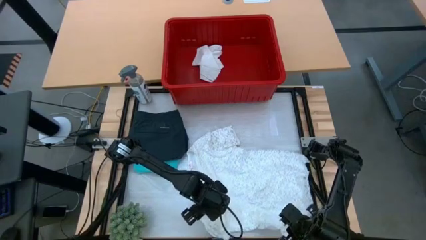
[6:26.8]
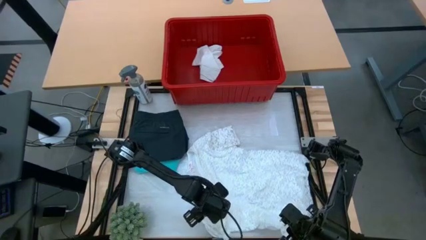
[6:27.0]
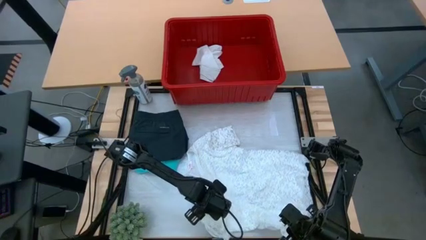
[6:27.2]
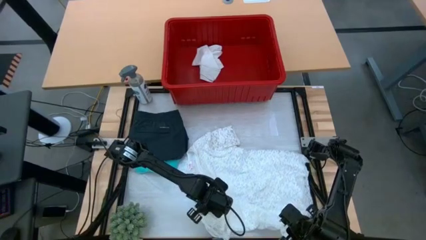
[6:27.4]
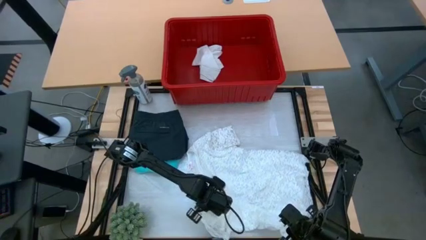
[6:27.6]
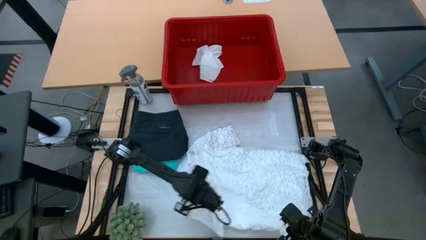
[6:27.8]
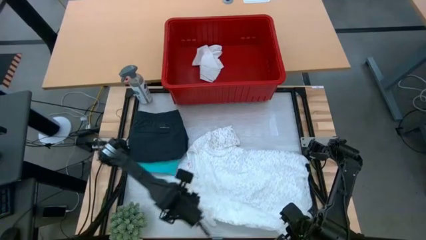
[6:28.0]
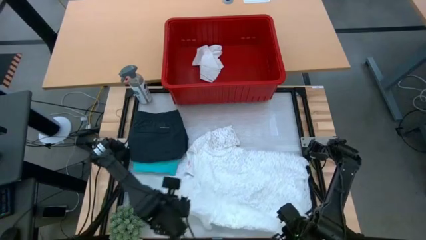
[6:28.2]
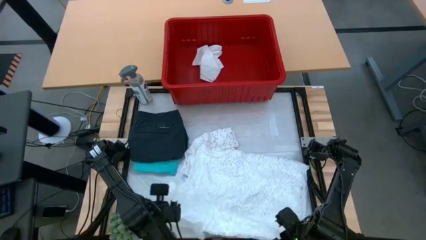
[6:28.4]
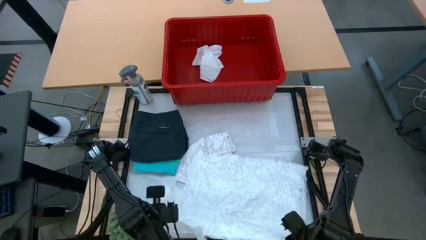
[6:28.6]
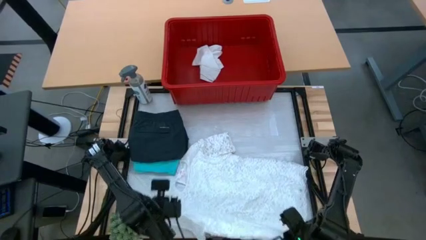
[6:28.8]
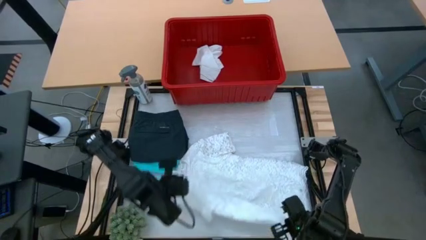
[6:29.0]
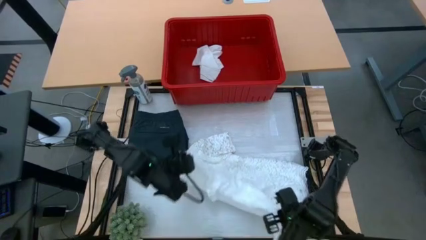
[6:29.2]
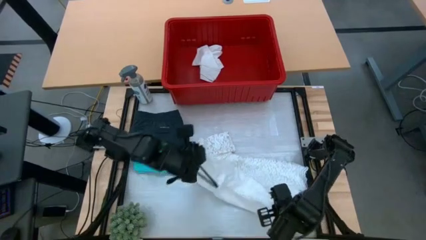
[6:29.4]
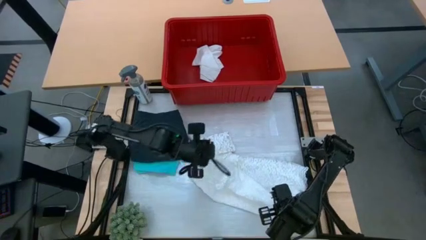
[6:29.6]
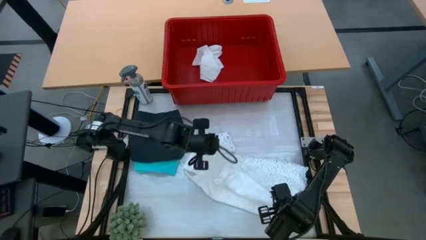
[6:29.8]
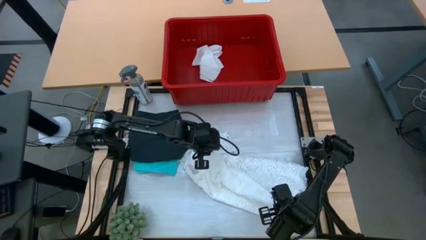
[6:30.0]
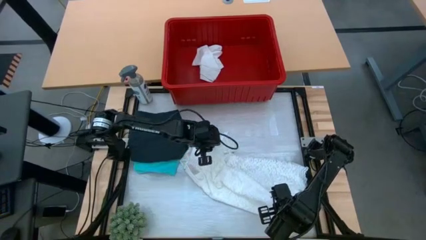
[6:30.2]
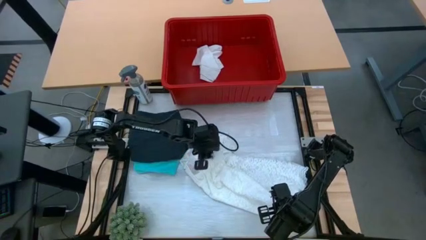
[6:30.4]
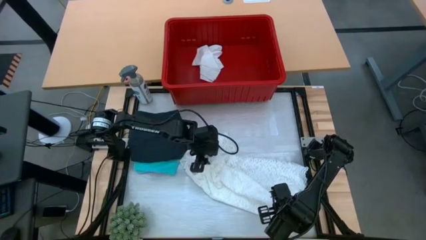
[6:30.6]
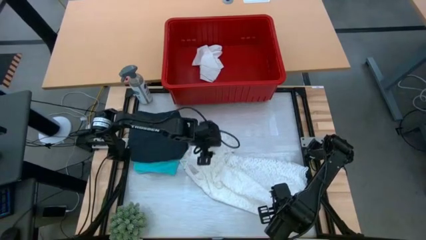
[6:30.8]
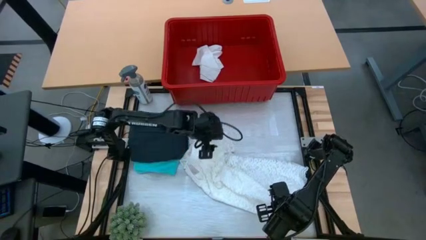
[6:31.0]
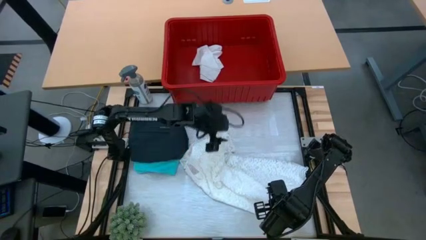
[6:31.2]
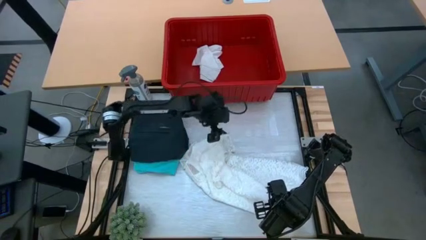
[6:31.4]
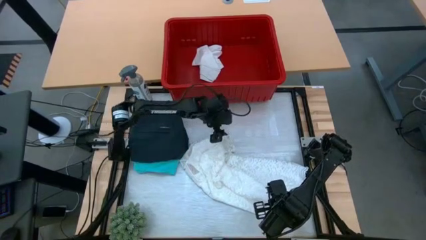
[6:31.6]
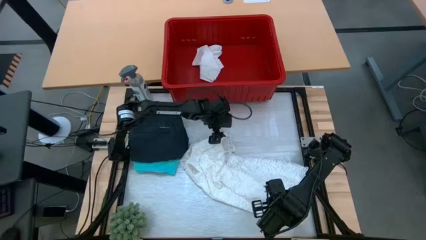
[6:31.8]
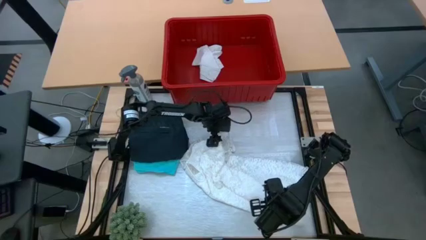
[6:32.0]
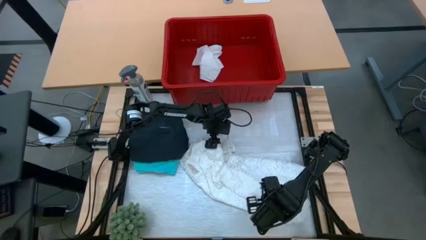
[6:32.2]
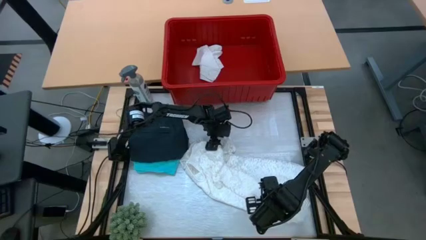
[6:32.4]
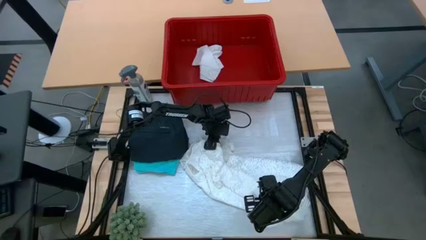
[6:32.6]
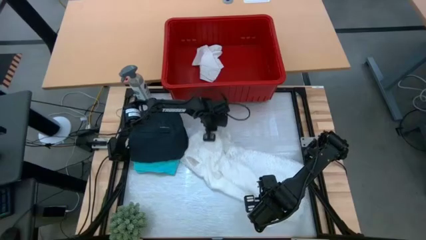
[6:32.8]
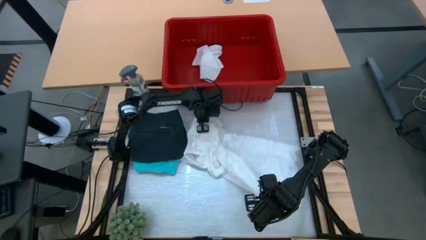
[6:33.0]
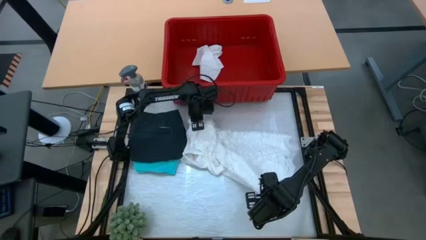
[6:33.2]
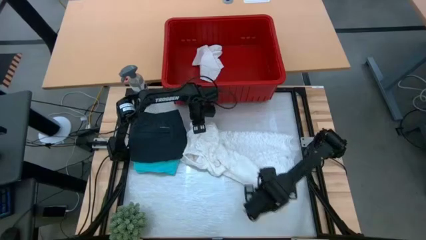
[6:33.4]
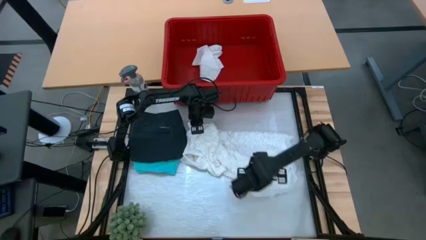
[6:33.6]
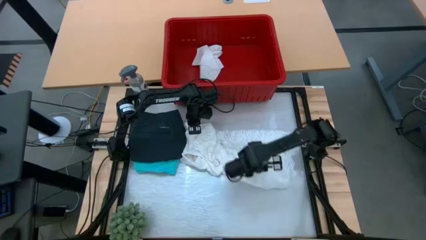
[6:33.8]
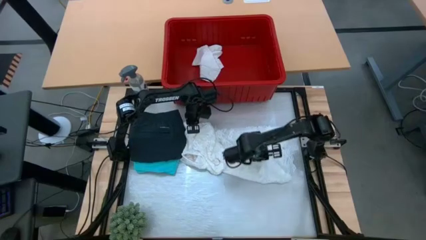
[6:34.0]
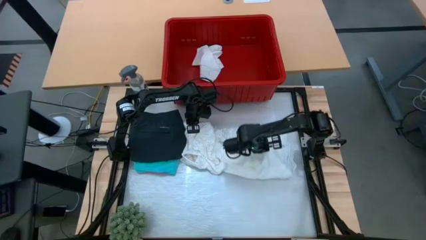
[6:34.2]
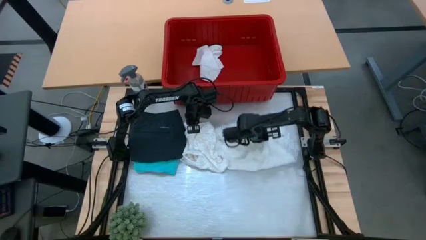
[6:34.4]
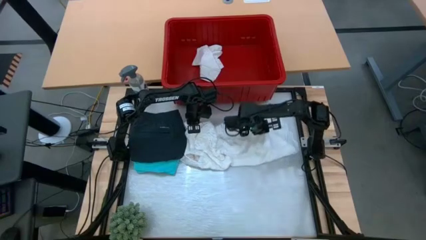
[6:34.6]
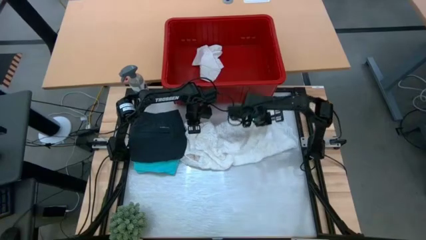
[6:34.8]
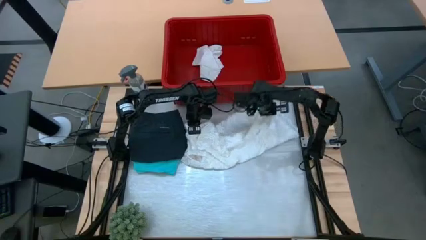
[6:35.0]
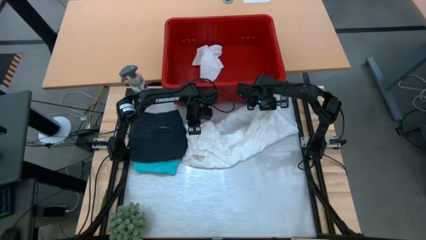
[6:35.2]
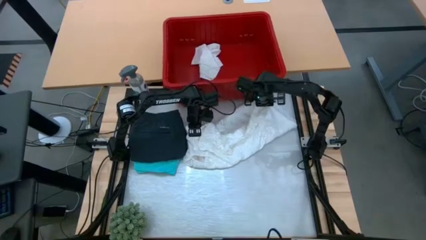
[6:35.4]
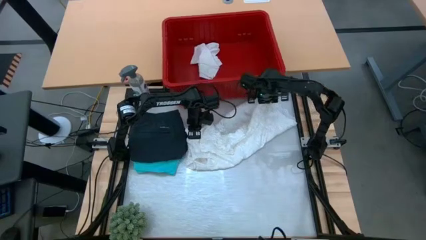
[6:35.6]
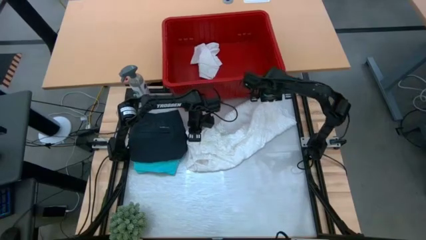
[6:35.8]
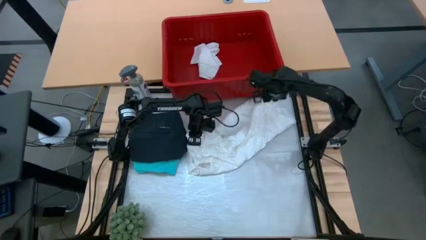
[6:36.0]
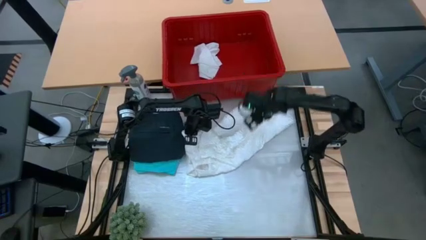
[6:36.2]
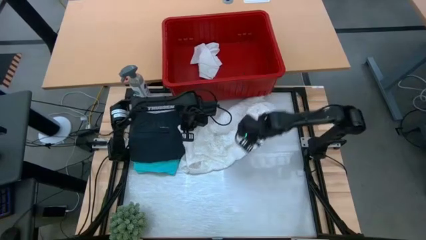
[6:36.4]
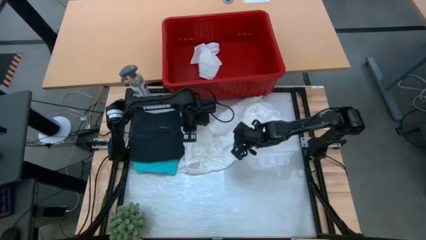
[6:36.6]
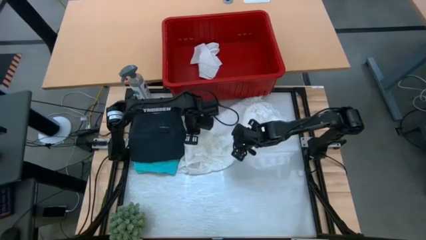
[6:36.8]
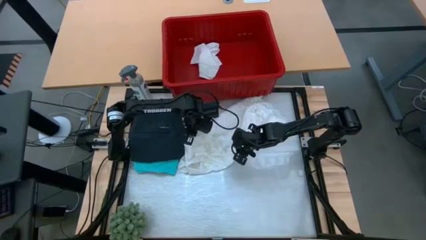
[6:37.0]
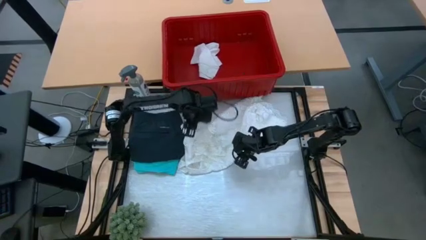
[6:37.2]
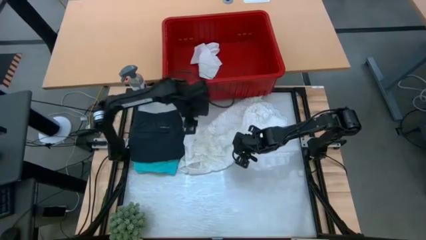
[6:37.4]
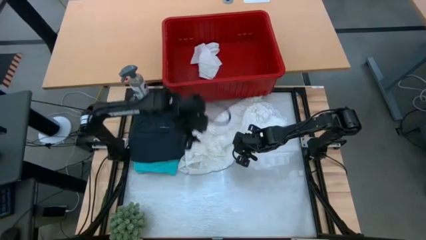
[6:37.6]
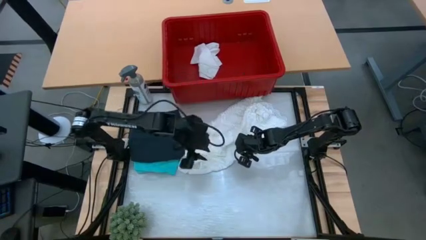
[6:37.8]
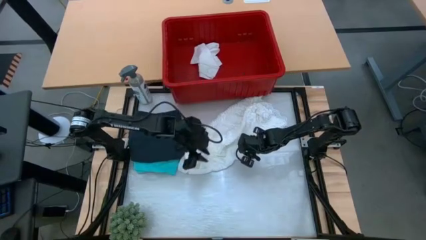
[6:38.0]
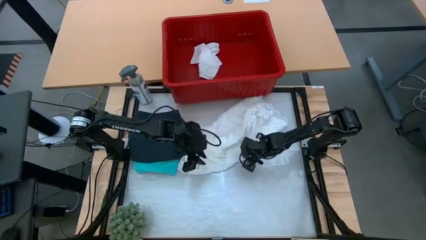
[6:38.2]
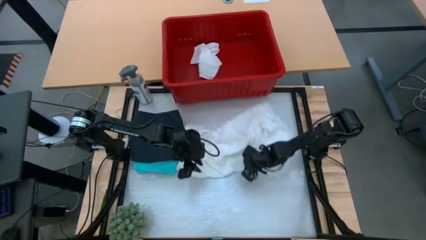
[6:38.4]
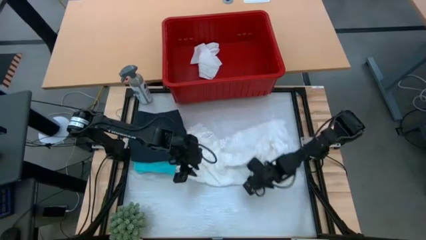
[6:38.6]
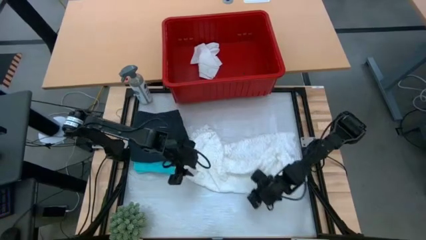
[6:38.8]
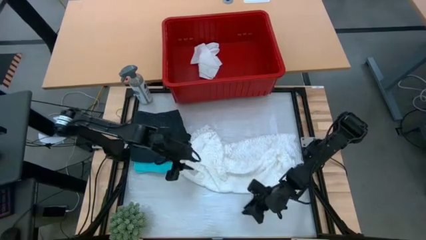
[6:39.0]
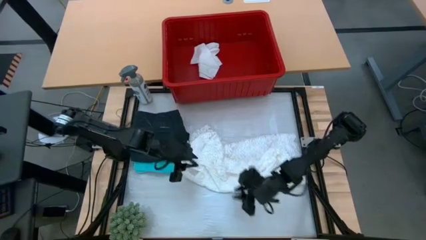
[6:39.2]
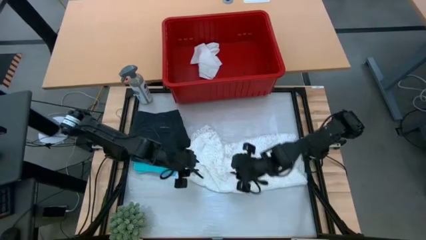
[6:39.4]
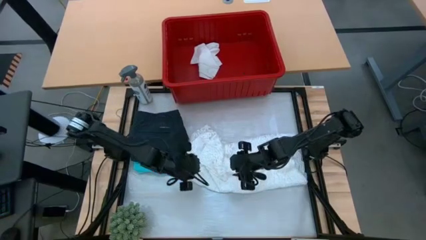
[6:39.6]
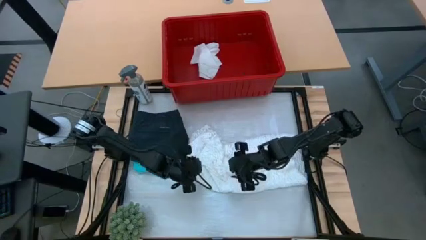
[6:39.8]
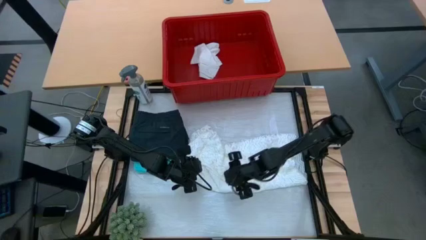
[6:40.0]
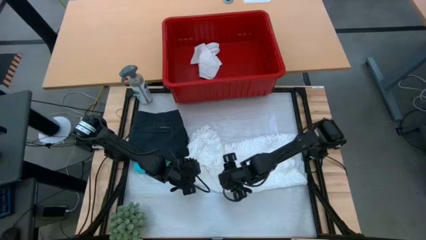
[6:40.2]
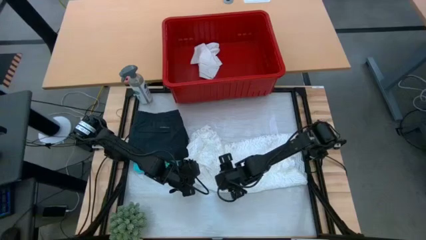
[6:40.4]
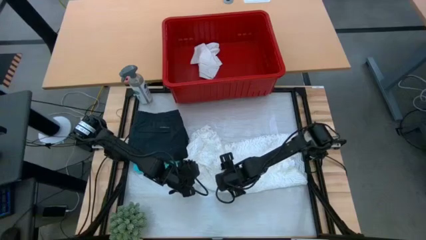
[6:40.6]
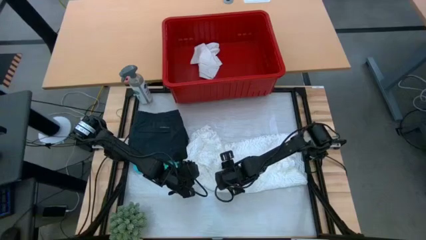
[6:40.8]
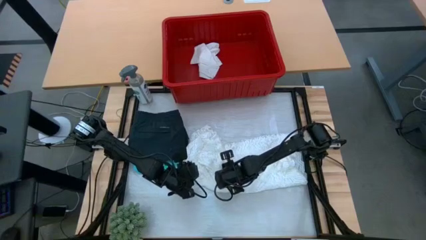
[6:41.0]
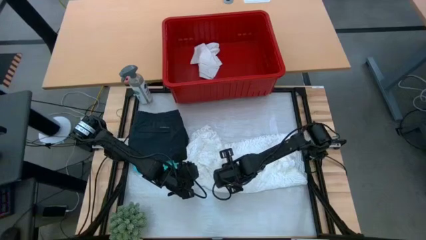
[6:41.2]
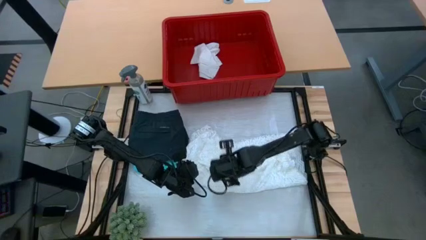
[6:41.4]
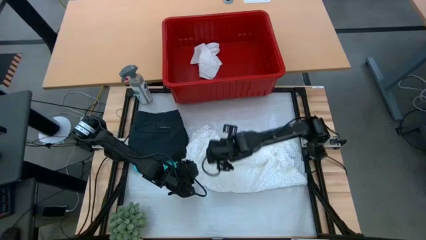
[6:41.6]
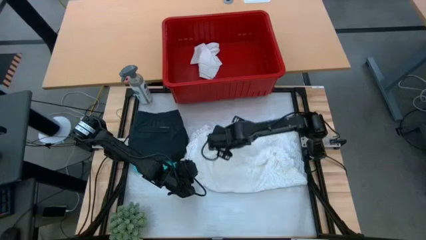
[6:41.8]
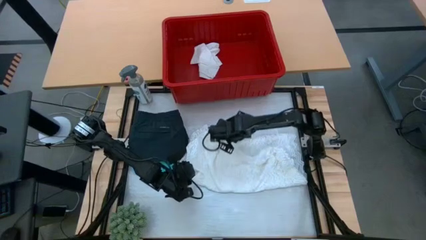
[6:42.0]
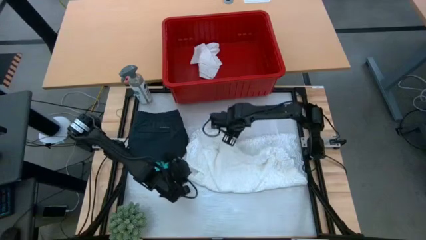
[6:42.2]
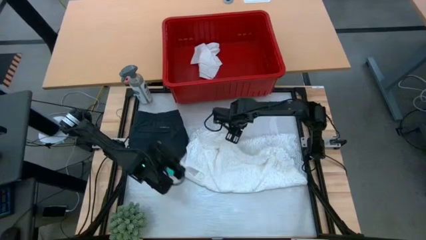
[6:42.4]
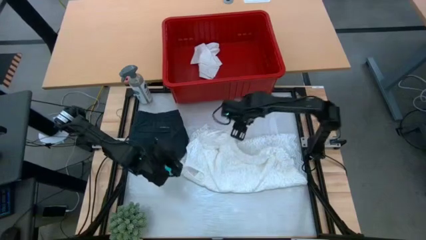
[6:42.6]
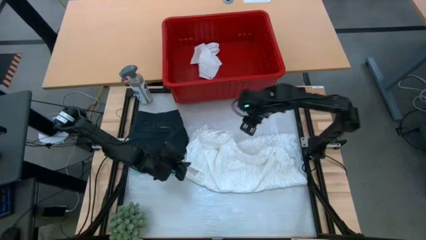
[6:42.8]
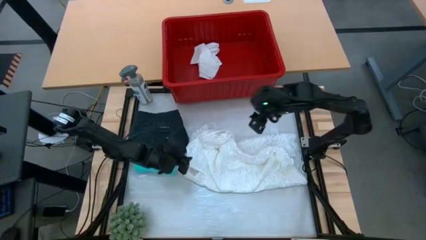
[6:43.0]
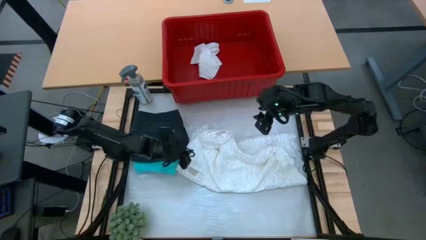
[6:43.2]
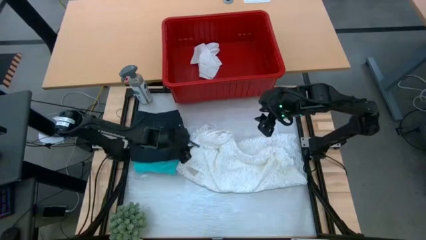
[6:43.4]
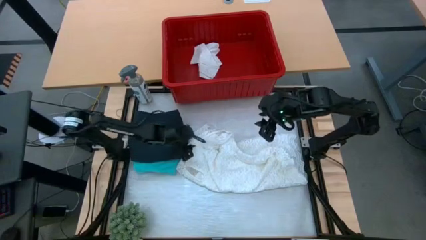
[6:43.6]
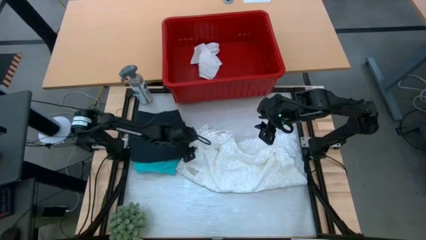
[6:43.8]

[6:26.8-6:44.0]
Task: Fold laundry
Fold the white dress
